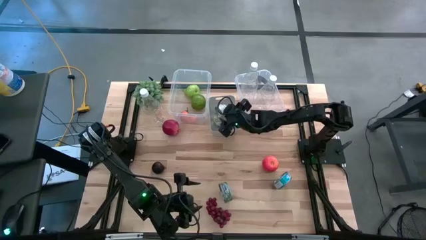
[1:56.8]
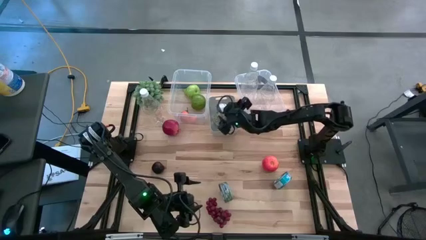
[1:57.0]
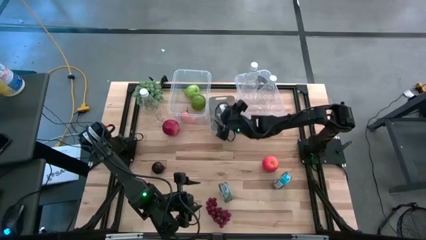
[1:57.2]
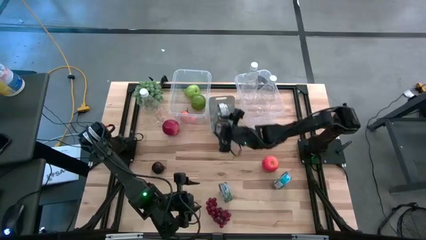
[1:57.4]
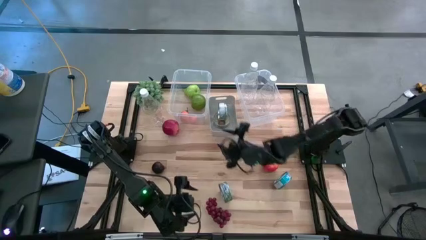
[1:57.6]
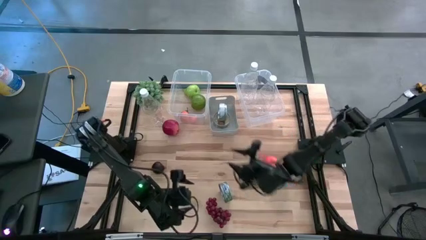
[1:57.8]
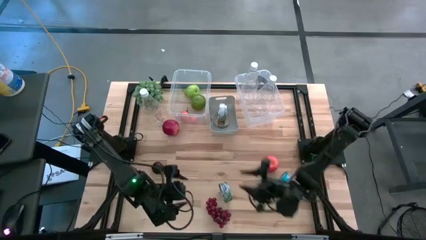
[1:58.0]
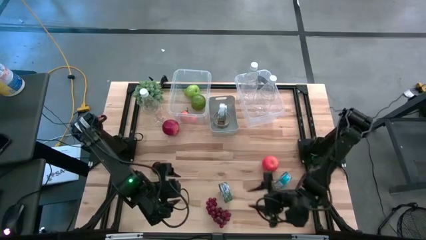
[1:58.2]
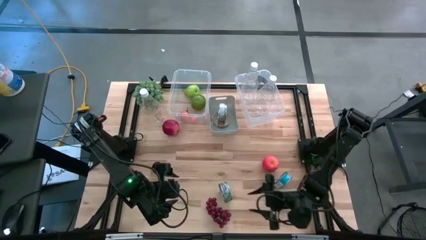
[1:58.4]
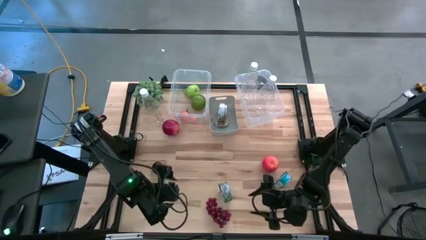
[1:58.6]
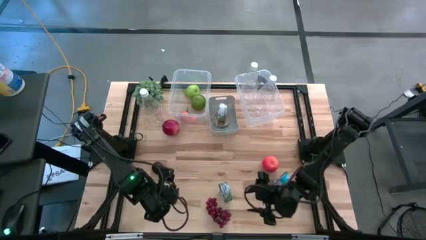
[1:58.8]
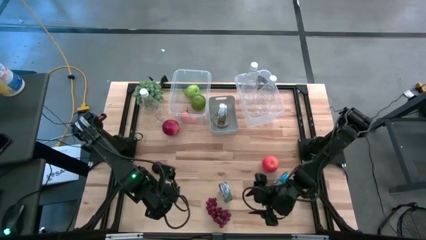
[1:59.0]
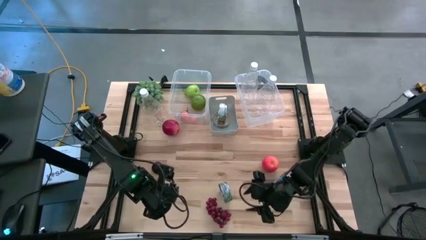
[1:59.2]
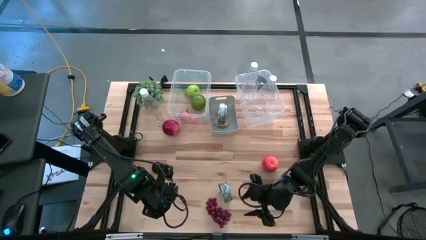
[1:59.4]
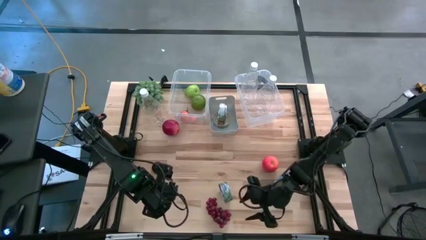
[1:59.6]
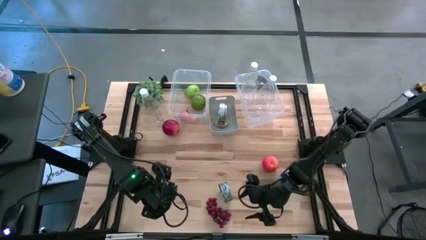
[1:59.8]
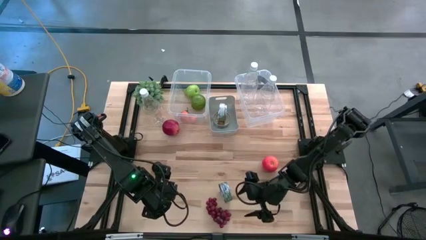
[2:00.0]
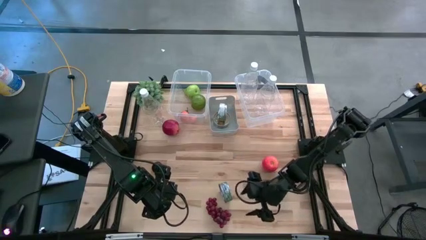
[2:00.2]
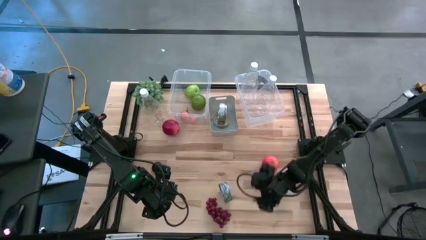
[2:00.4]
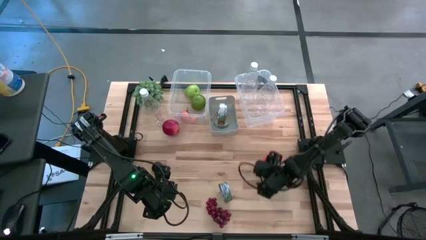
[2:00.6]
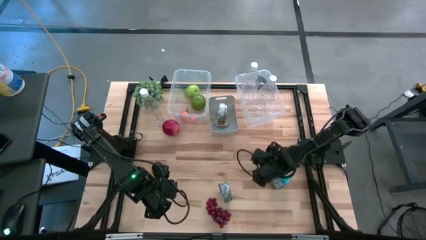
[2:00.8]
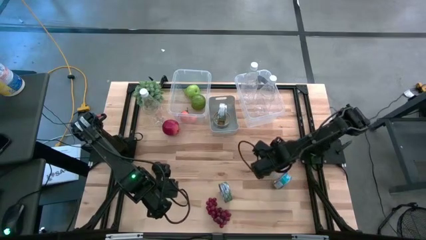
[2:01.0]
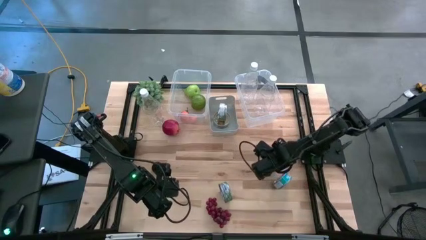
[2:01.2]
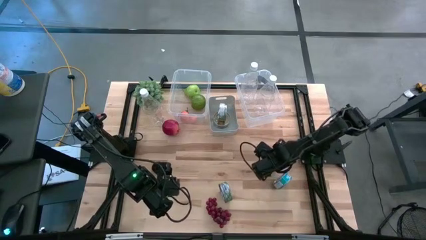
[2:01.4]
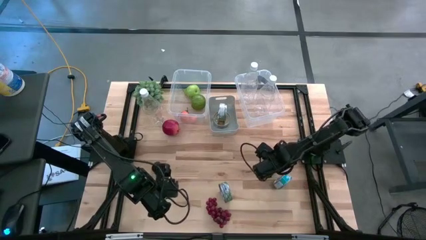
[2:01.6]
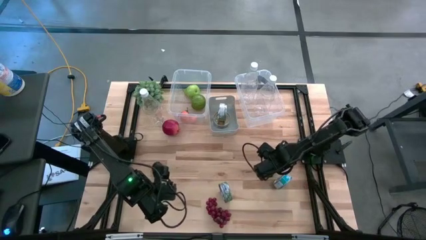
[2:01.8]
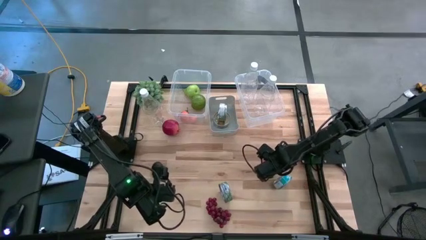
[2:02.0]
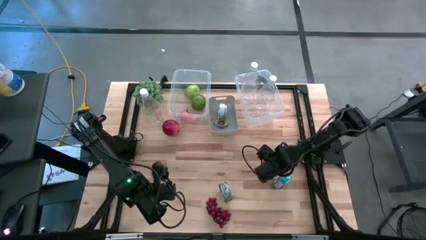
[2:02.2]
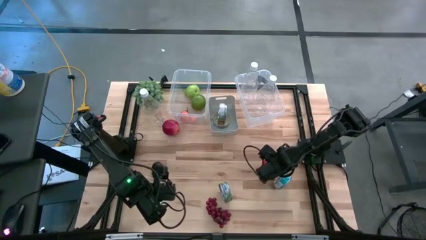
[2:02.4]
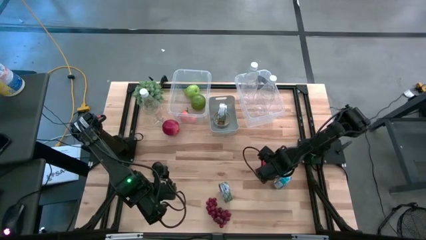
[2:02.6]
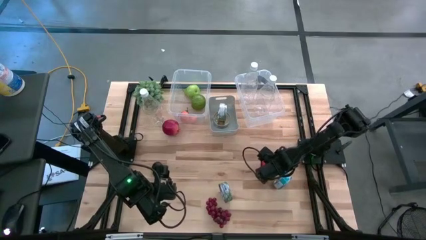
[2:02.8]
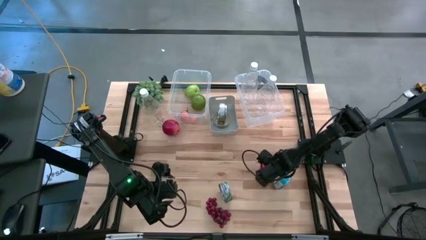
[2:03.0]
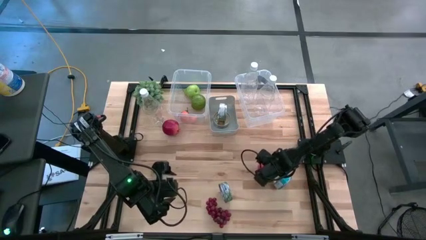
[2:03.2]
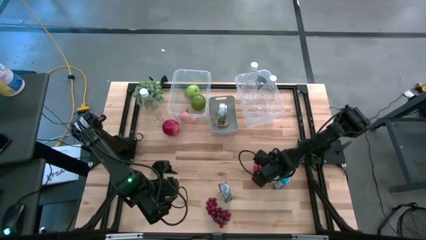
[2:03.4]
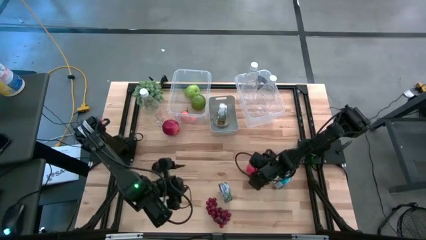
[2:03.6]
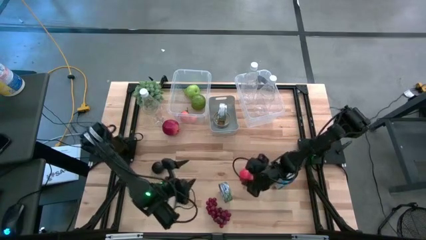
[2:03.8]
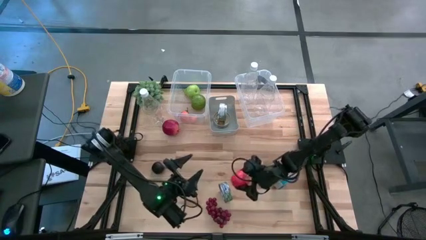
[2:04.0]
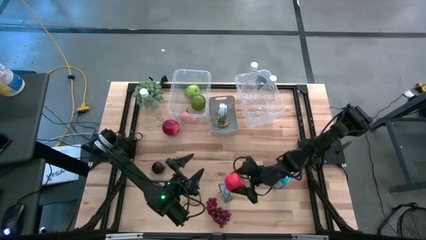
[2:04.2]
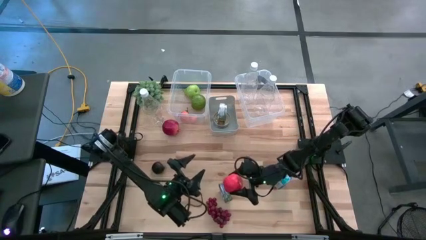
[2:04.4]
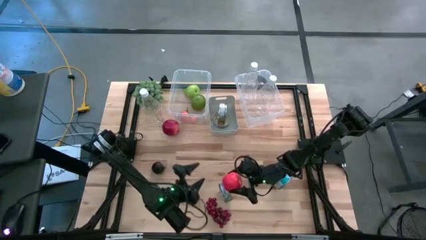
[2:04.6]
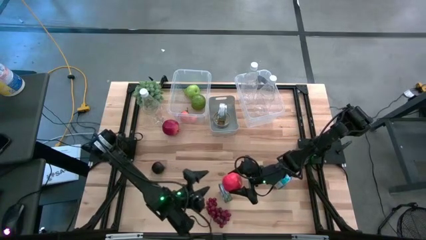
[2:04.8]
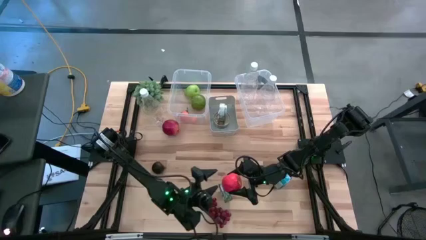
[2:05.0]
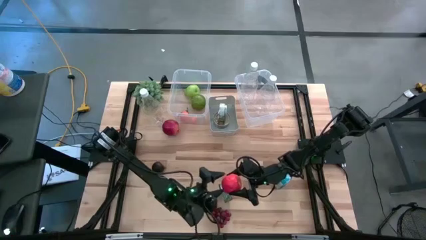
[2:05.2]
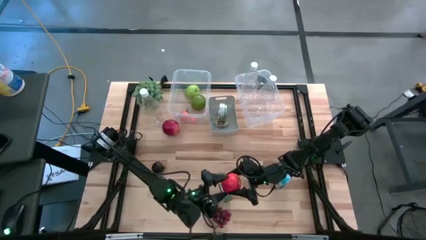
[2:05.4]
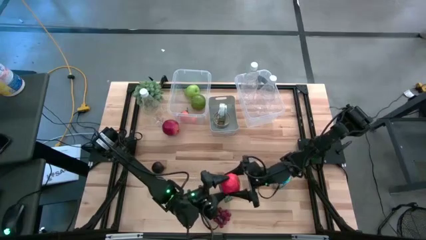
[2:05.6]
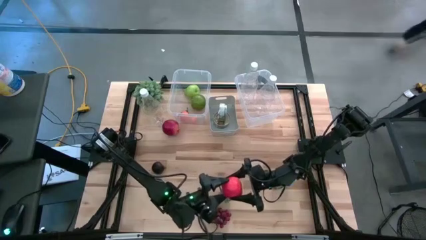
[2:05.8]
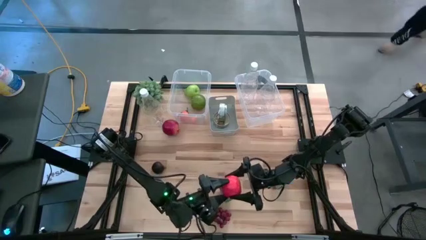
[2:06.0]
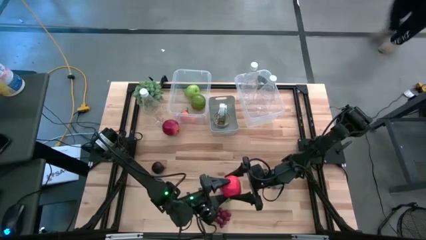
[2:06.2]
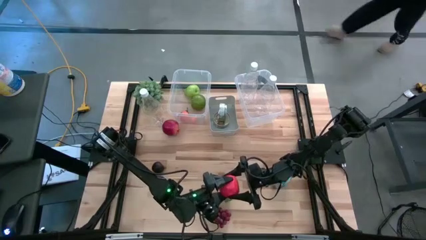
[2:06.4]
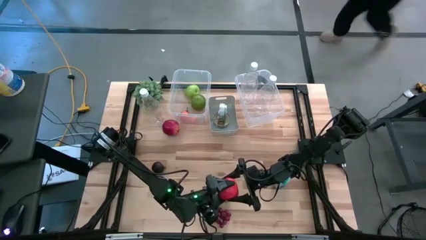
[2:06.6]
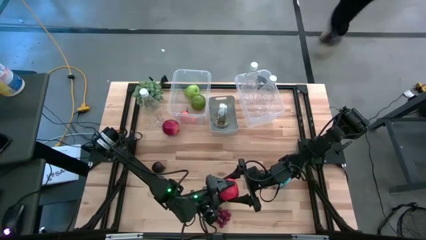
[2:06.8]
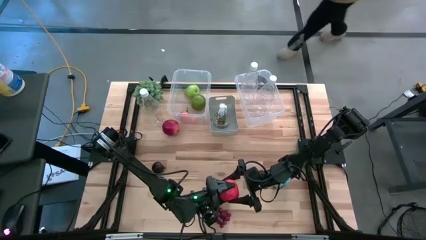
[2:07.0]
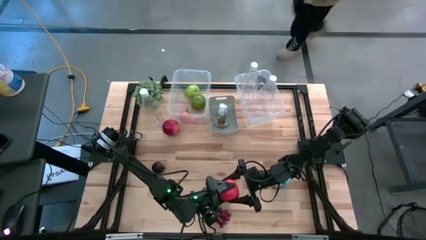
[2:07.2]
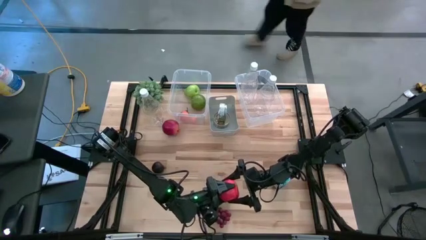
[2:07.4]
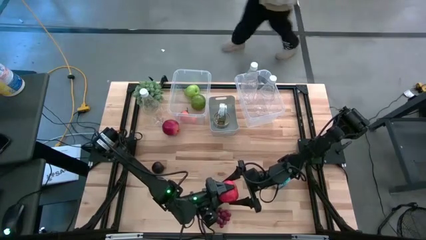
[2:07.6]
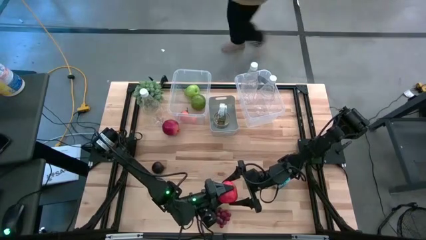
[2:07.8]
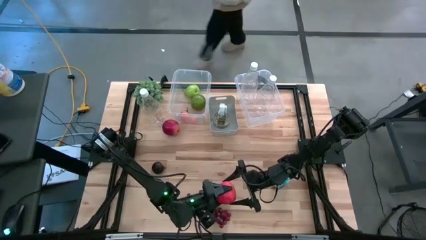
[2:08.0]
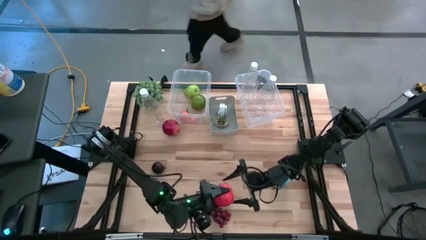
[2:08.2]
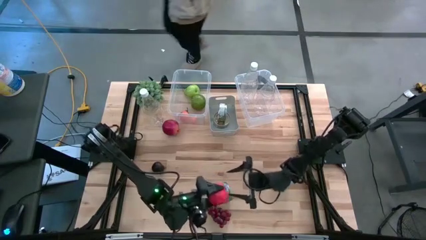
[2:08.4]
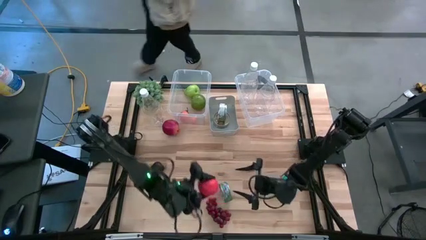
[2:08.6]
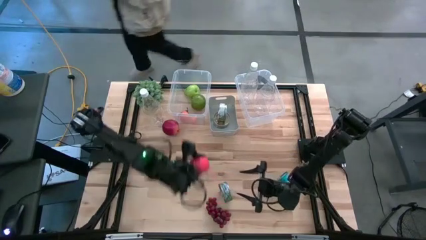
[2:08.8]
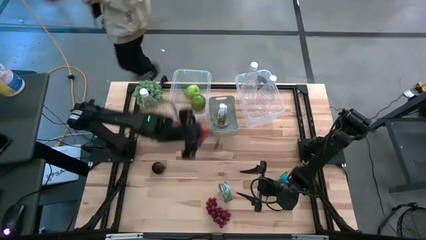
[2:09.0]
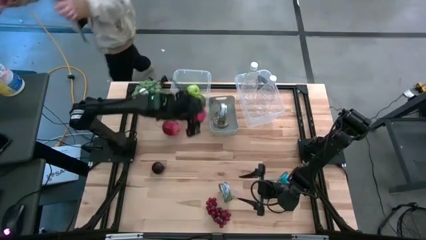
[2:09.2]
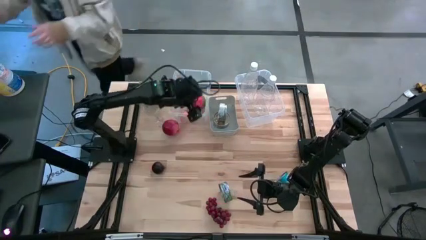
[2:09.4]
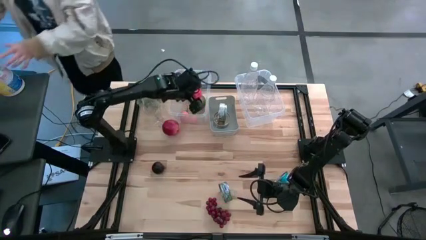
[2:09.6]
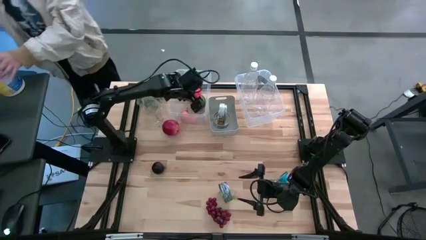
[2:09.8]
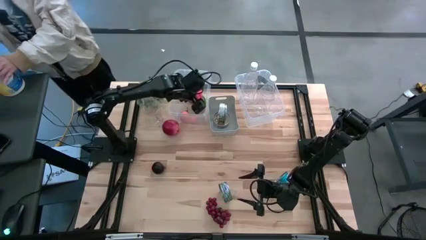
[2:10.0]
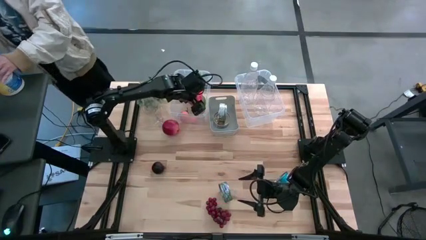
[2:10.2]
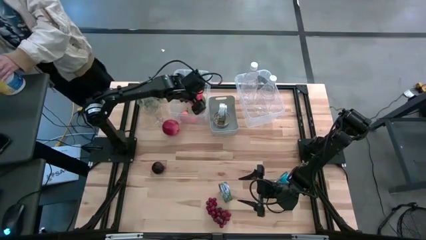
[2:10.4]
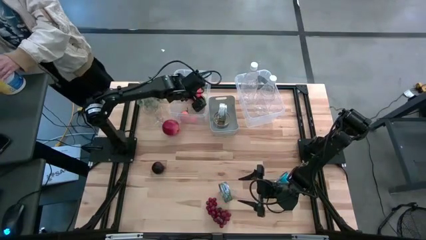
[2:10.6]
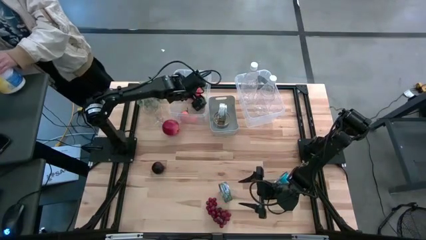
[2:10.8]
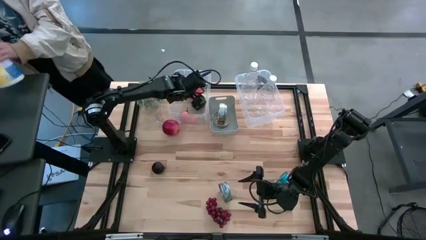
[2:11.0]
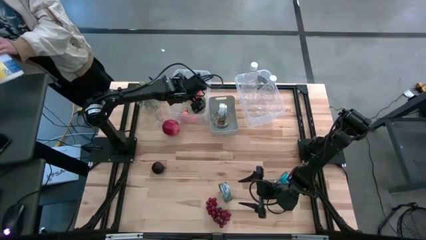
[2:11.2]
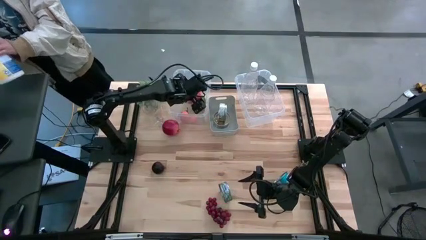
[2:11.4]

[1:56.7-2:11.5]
Task: Pick & Place Food Item
Put the red apple into the left transparent bin
